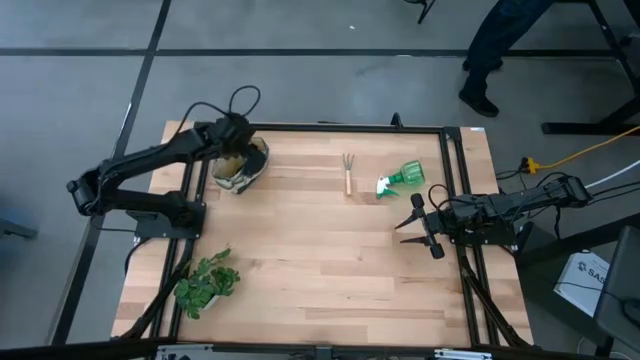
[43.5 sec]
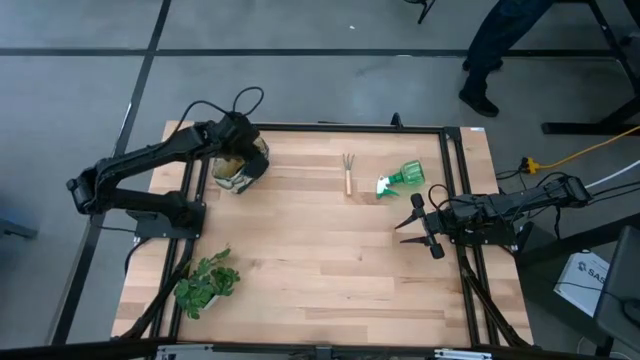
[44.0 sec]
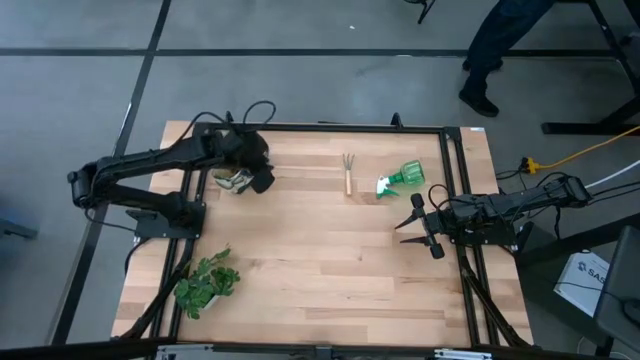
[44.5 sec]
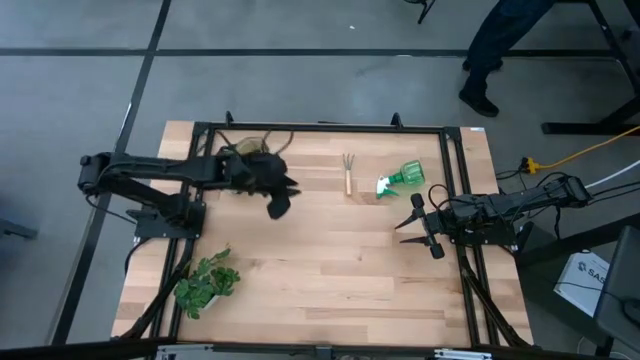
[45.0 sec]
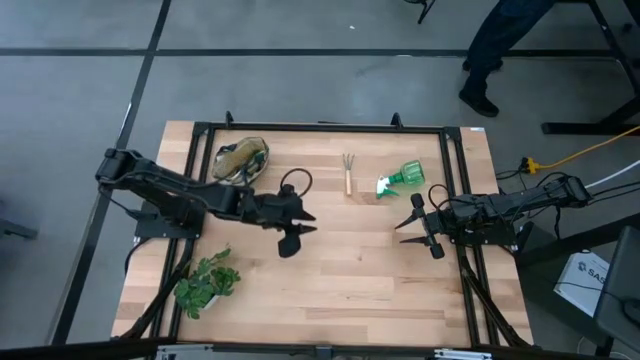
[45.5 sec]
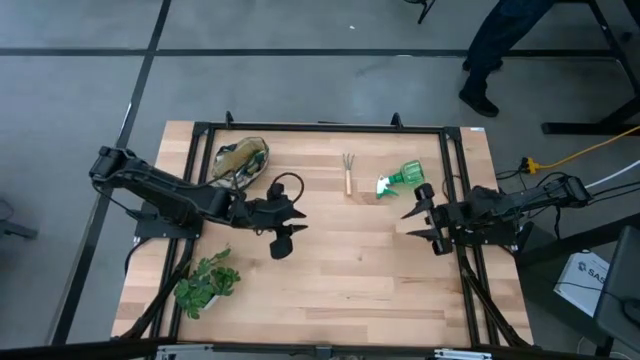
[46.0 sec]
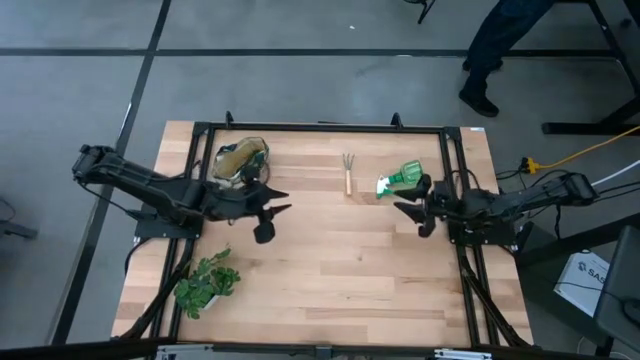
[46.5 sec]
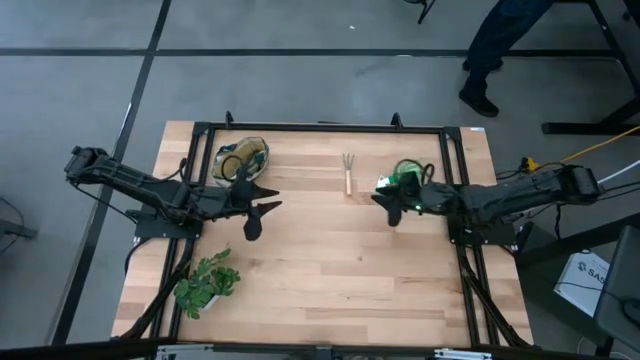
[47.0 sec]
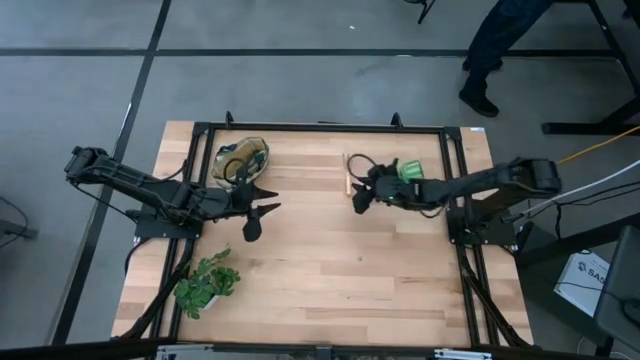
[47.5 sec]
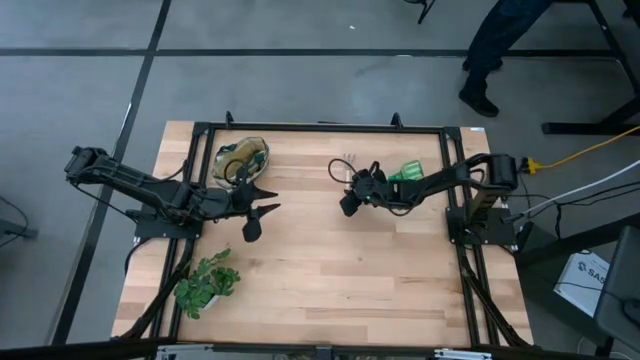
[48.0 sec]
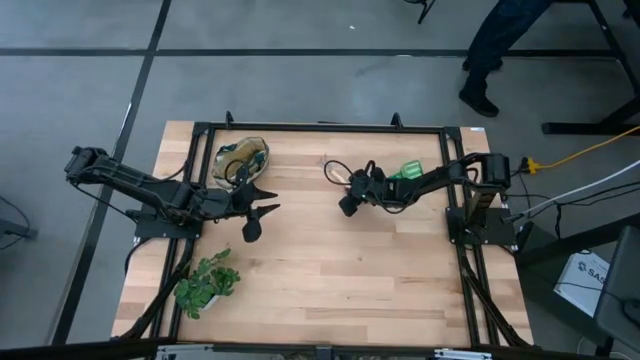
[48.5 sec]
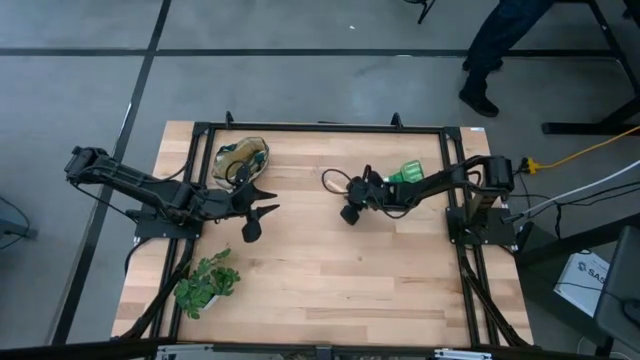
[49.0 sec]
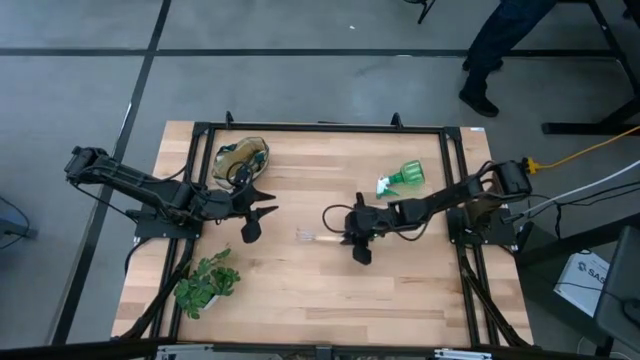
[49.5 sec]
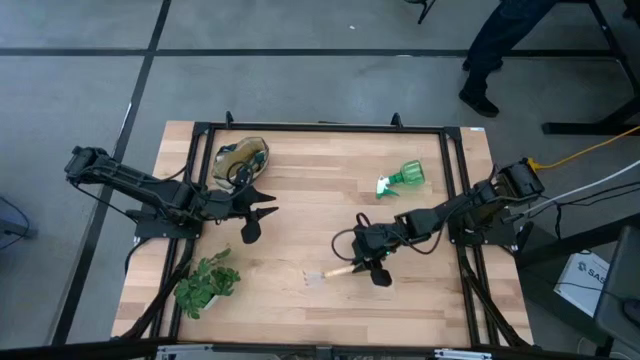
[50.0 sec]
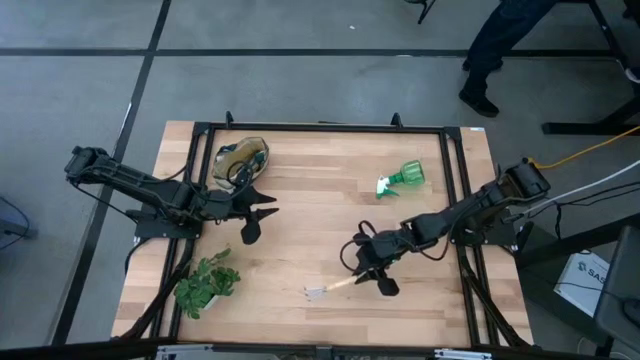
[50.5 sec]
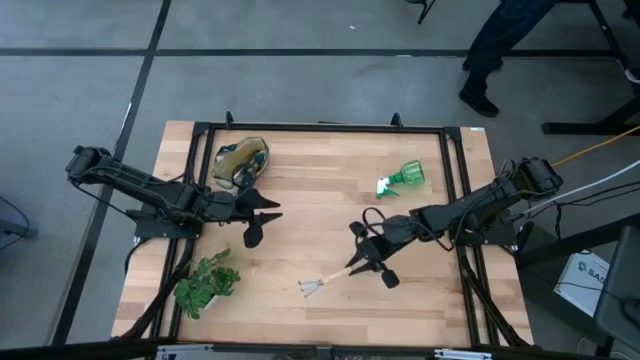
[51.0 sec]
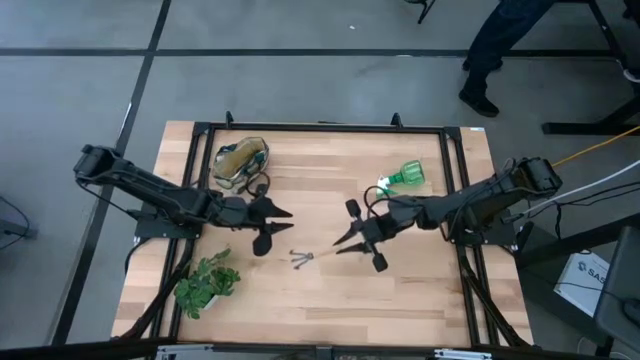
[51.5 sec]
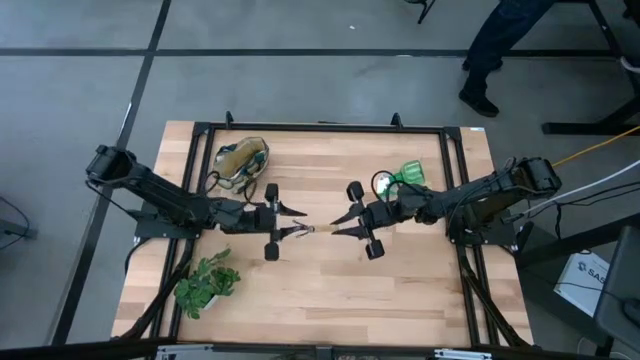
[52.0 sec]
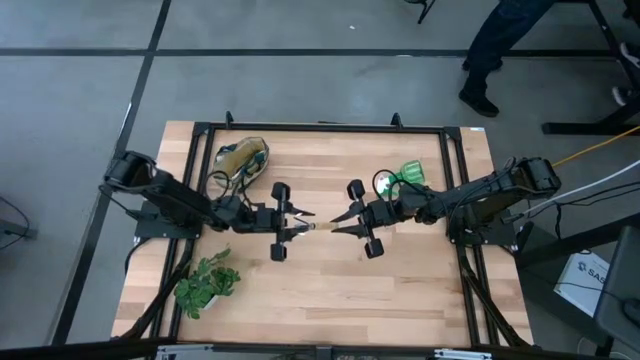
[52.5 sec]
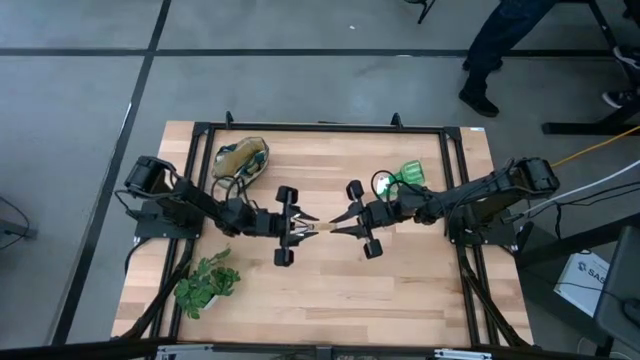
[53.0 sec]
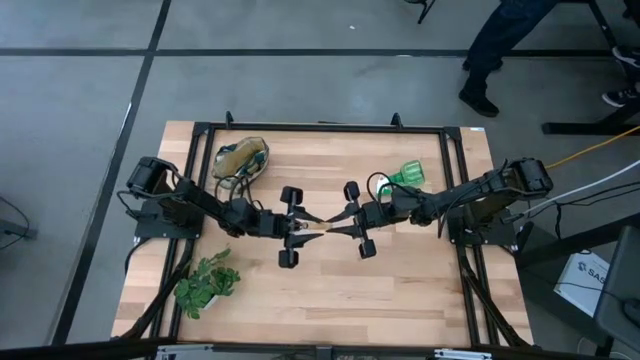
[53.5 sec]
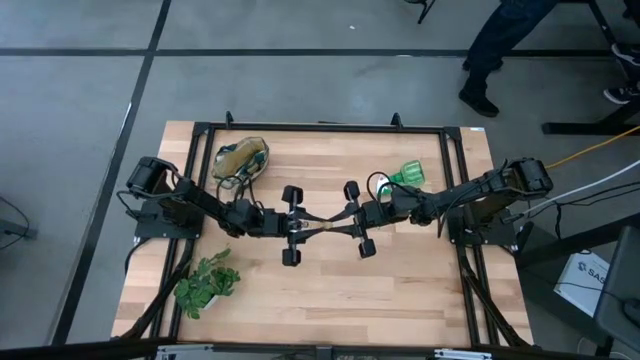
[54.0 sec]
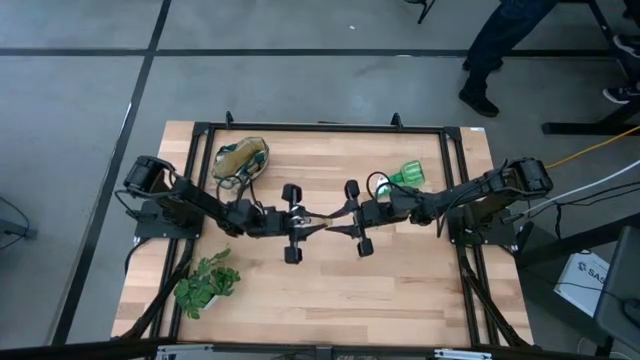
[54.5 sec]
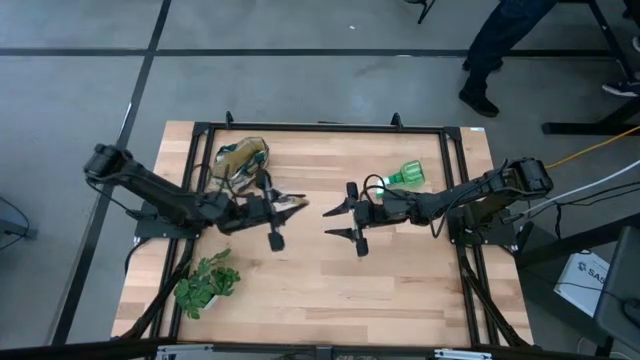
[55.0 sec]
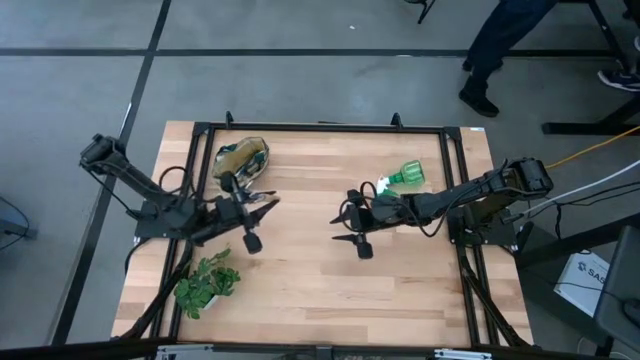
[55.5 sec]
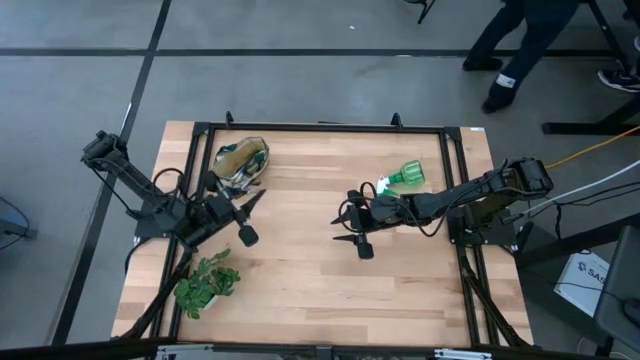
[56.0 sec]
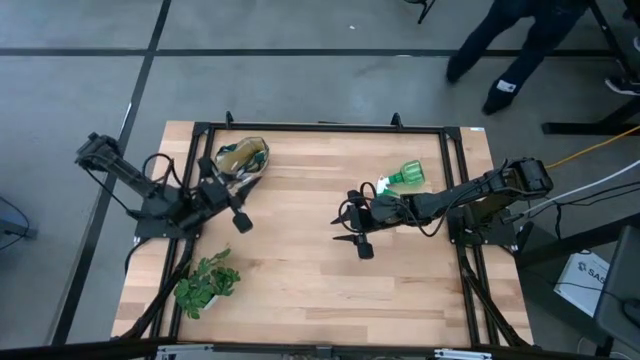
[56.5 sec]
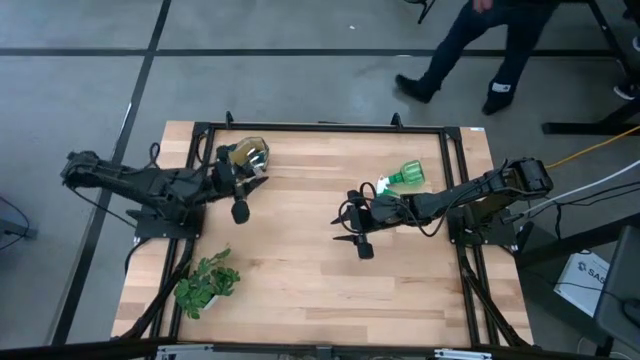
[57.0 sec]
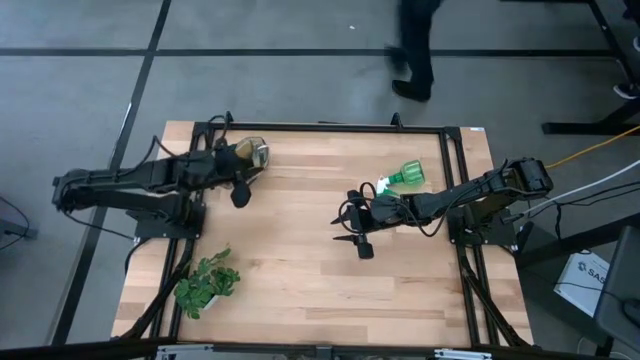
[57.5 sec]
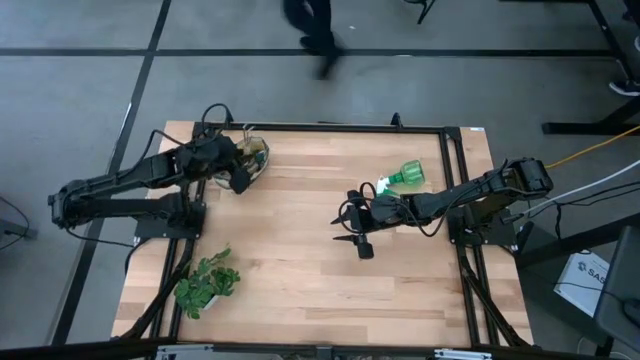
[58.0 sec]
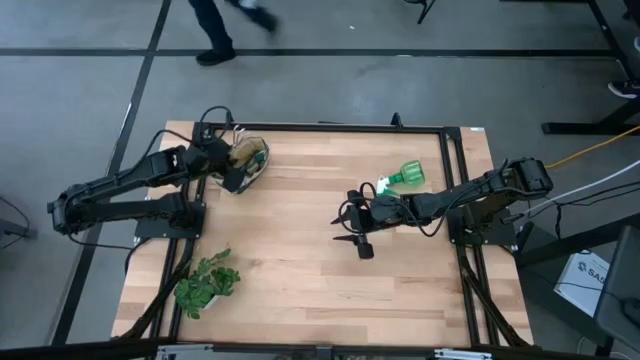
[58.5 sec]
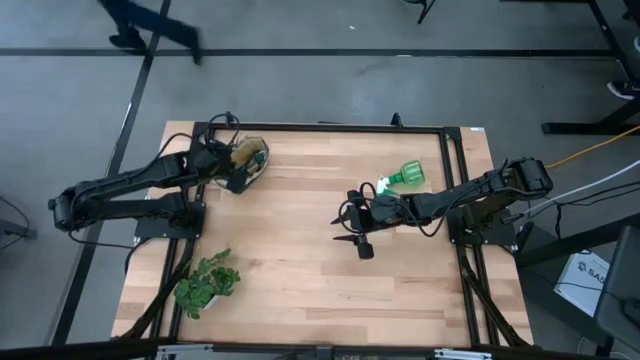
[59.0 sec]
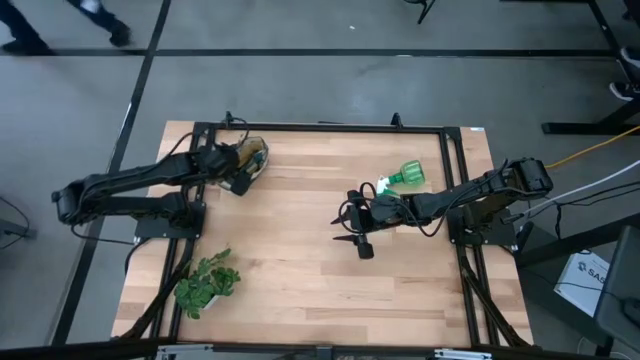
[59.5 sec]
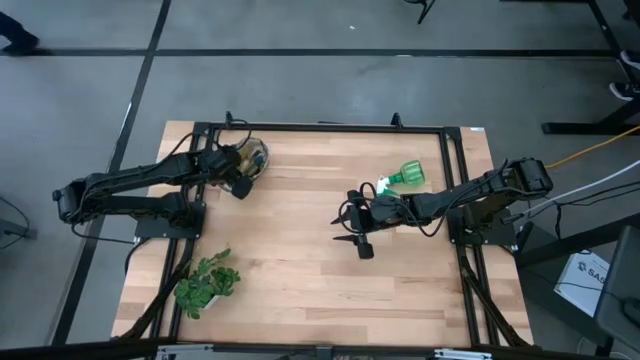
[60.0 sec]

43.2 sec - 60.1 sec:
Task: Pick & Place Garden tools in Gardening bag
Put the hand rake into the gardening bag

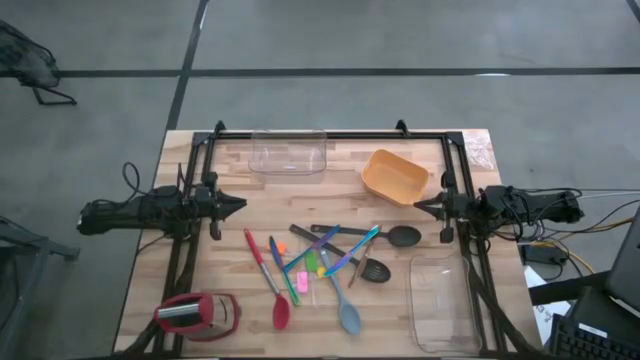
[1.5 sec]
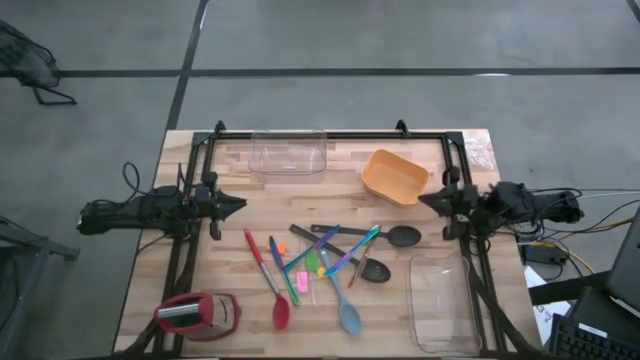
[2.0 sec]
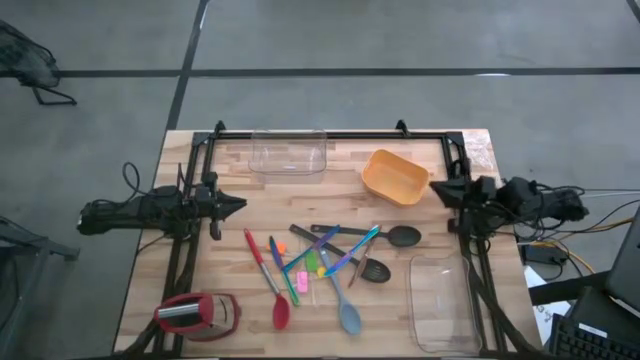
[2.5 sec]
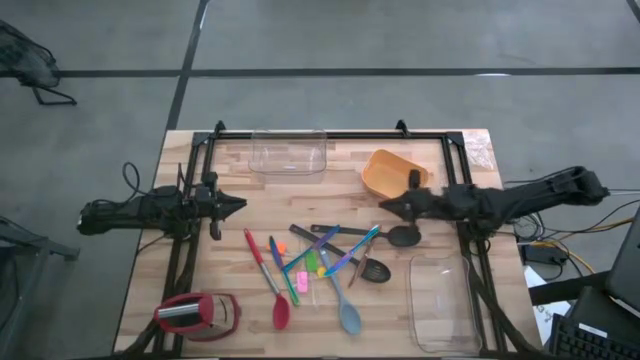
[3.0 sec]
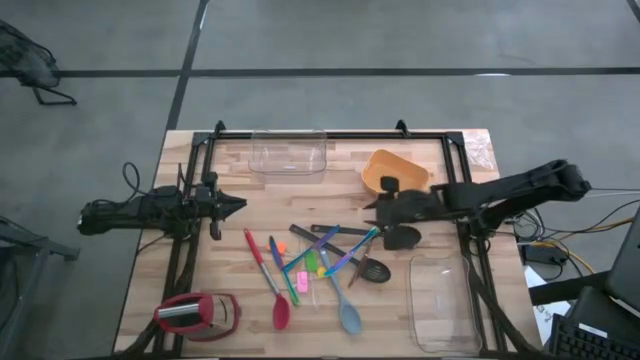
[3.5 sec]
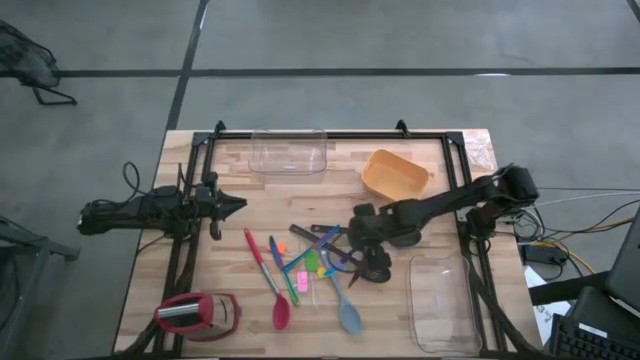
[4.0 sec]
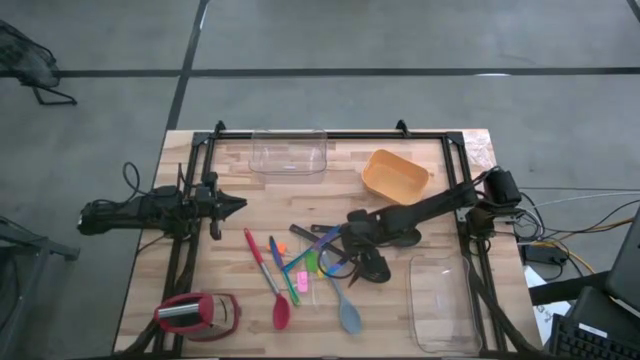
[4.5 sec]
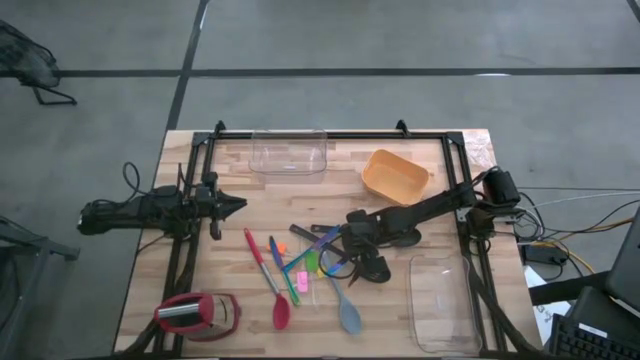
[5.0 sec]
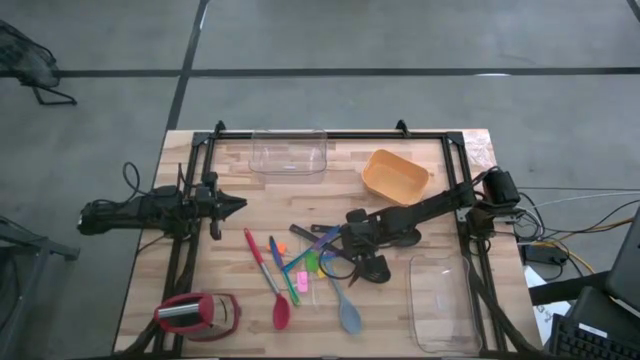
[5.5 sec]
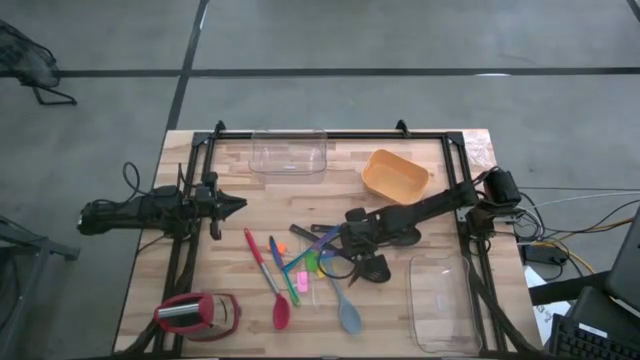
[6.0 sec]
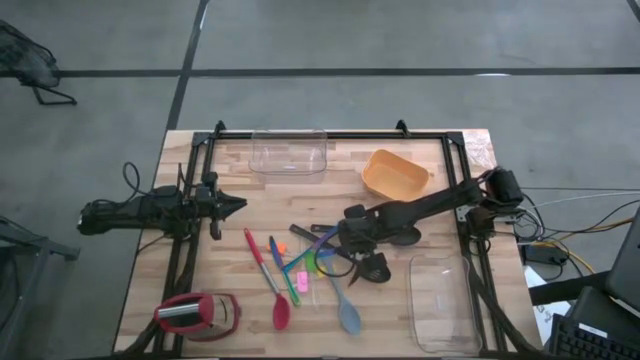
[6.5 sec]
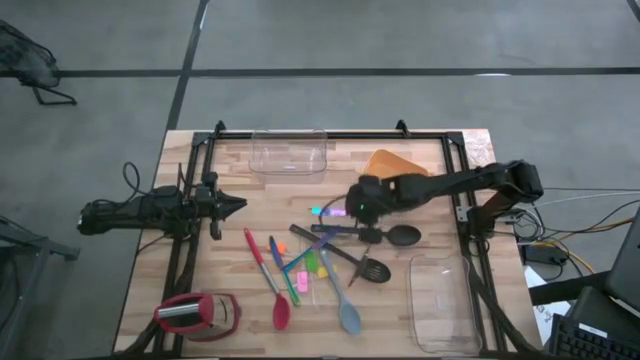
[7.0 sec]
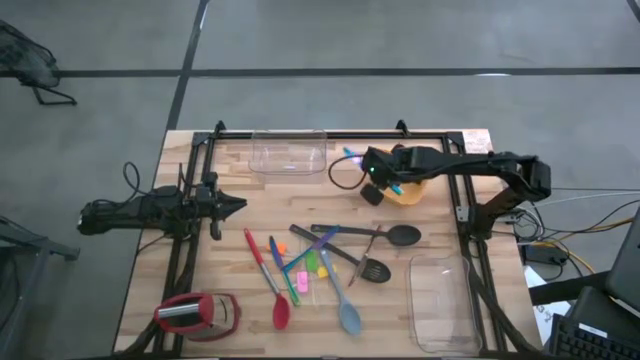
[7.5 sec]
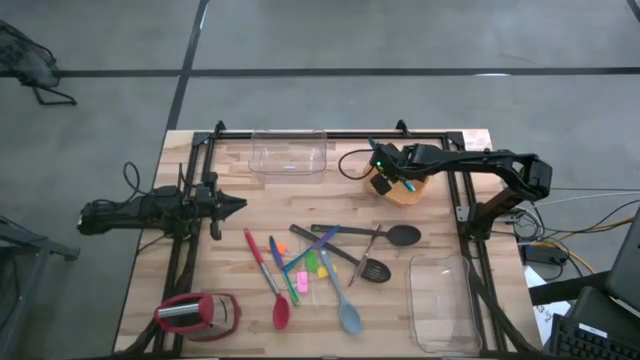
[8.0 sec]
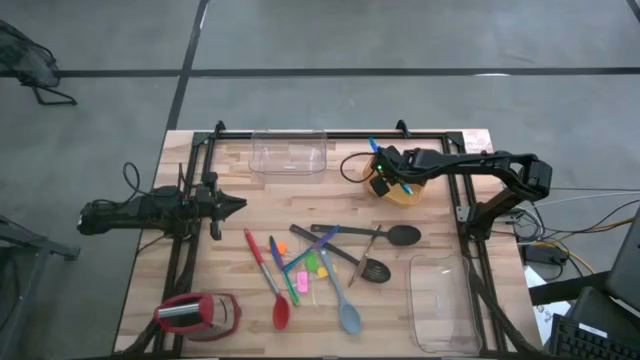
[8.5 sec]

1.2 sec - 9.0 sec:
Task: Pick & Place Kitchen Items
Put the blue kitchen knife into the yellow bin
